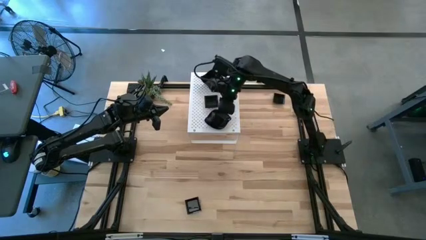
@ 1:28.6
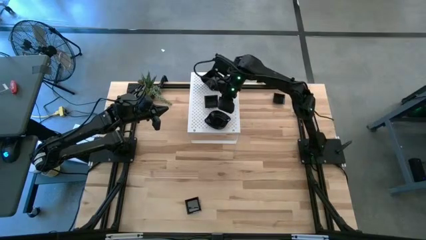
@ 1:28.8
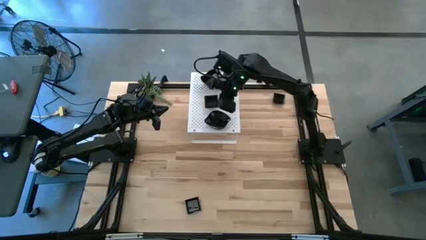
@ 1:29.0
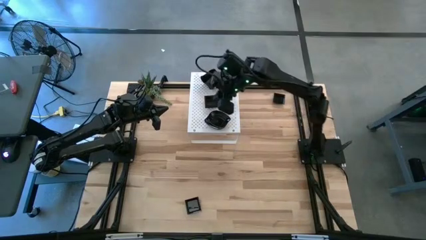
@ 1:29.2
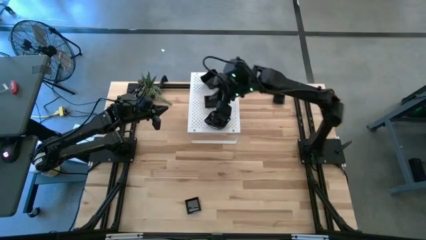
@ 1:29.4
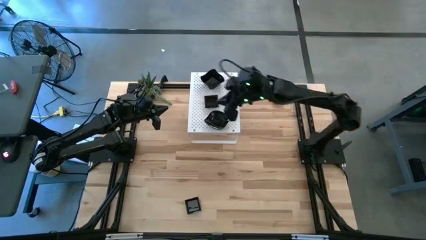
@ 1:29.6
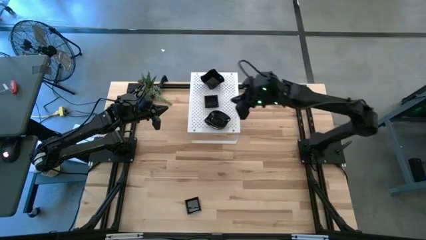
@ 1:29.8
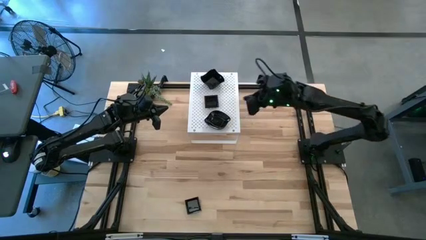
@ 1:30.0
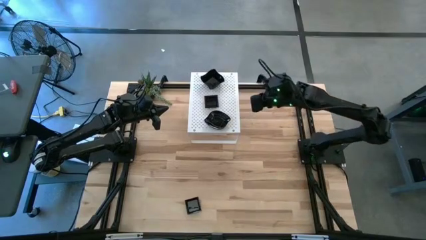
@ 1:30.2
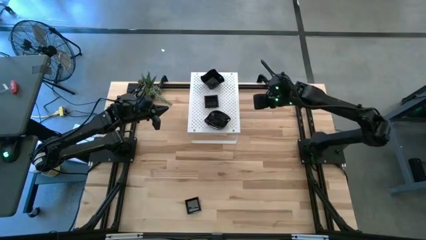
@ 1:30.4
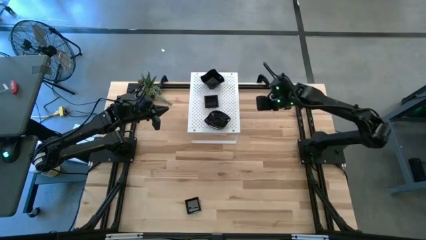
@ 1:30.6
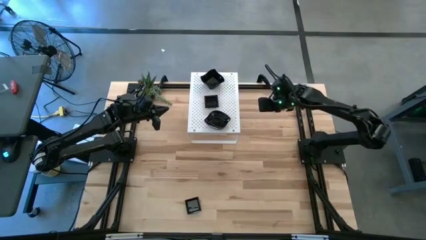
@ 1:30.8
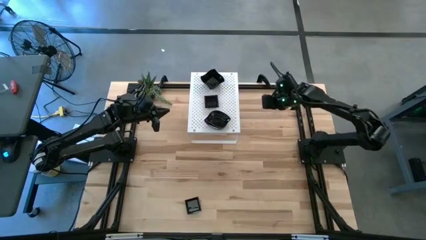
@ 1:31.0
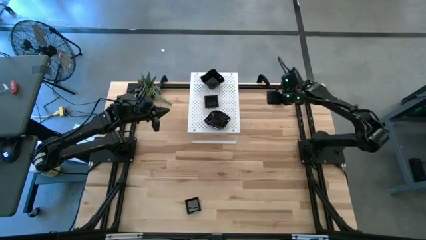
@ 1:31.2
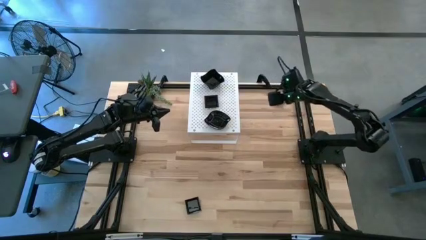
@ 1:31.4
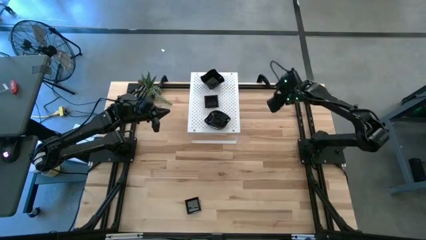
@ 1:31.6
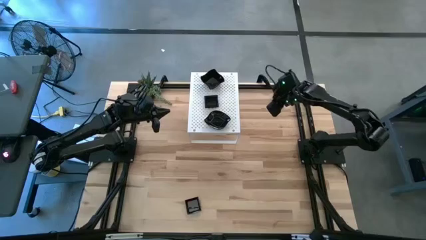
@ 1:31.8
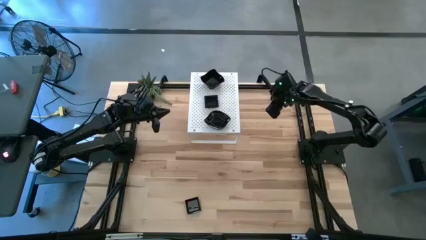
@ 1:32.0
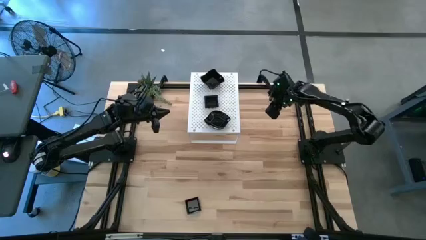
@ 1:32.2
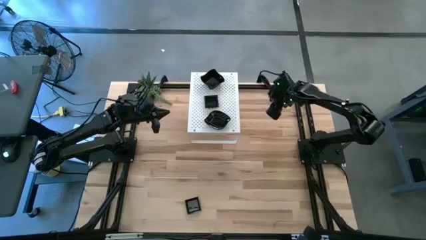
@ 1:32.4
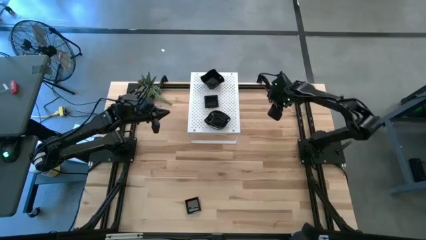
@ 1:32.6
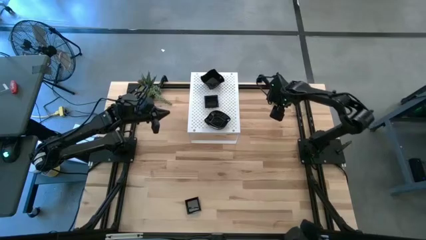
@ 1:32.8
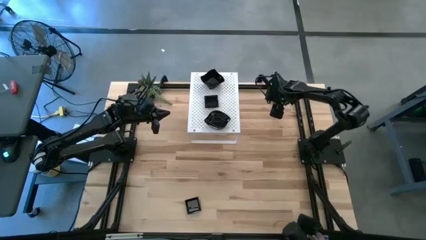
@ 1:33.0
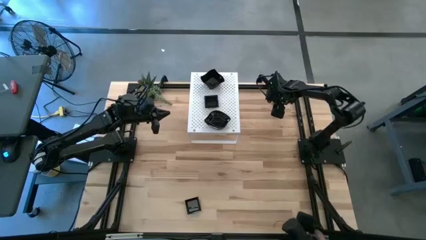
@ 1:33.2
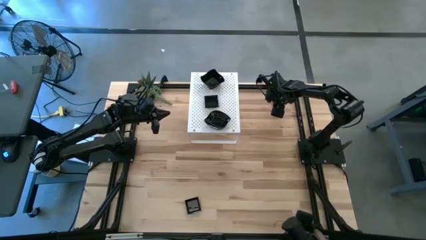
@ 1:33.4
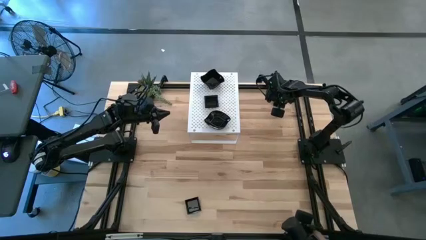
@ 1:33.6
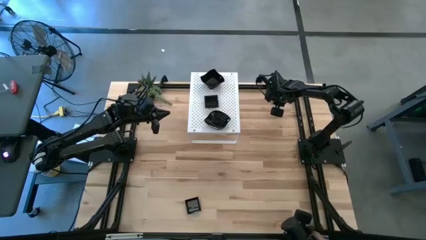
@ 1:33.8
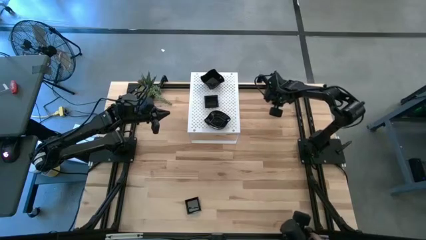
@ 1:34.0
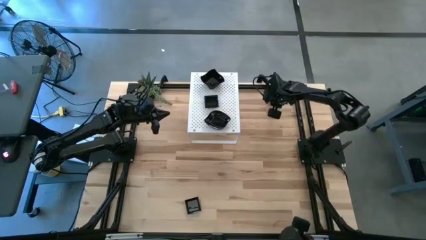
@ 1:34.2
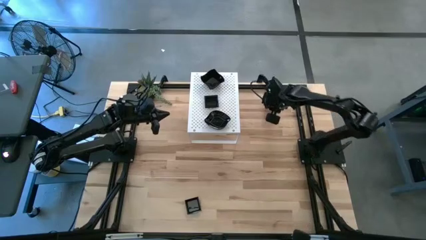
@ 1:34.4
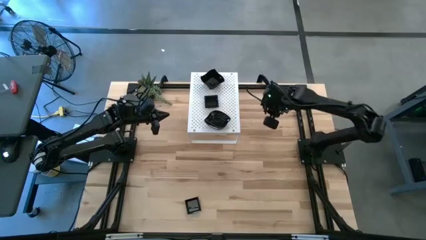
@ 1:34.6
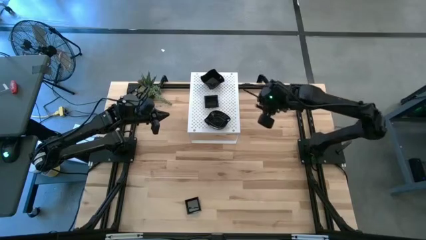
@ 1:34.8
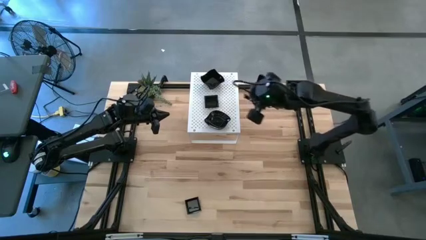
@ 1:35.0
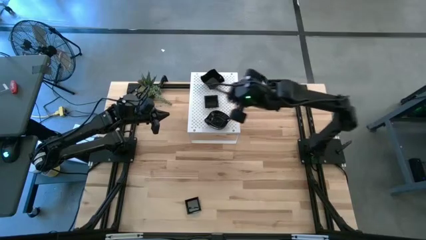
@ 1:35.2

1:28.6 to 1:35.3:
Task: Pick & Place Mini shaped plates
Stack the black square plate on top of the black square plate on the shelf

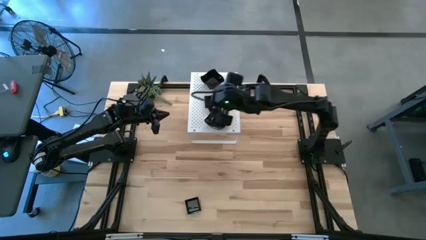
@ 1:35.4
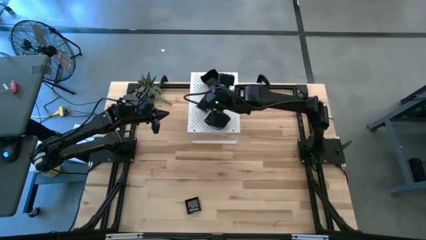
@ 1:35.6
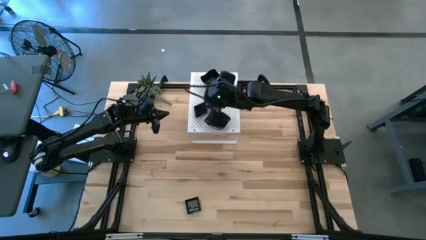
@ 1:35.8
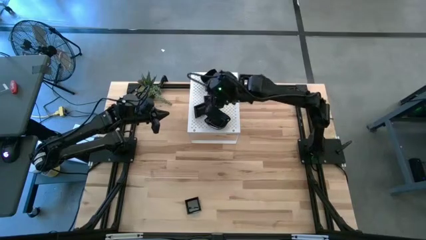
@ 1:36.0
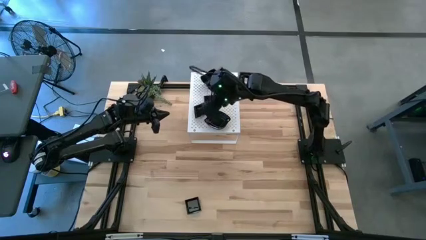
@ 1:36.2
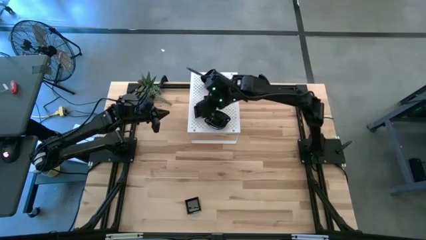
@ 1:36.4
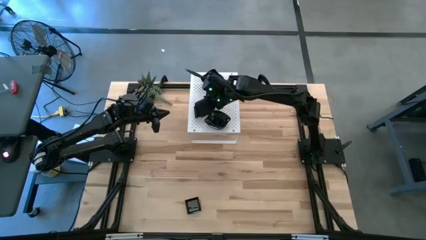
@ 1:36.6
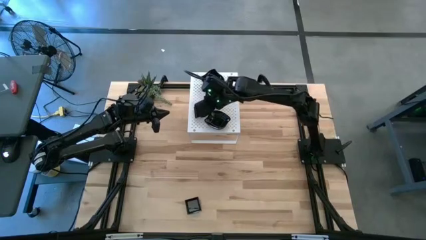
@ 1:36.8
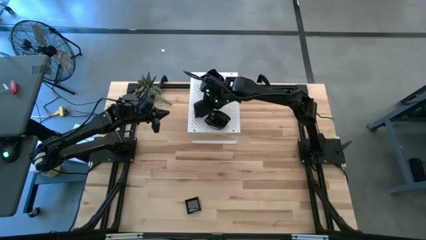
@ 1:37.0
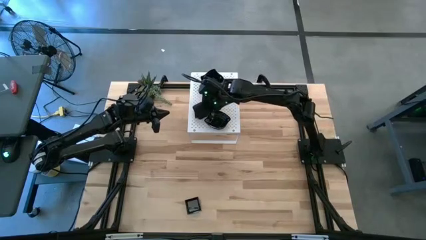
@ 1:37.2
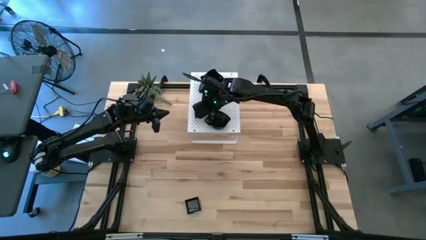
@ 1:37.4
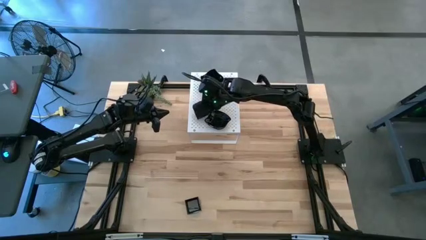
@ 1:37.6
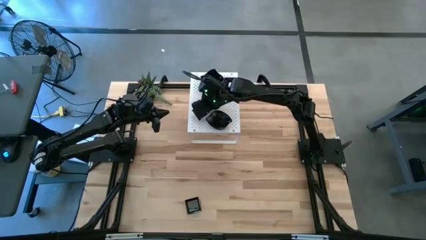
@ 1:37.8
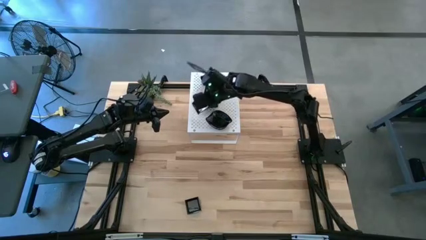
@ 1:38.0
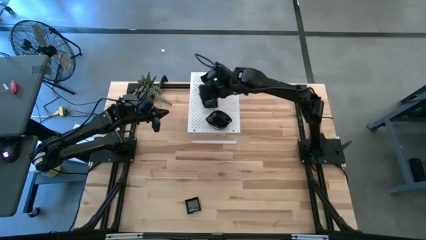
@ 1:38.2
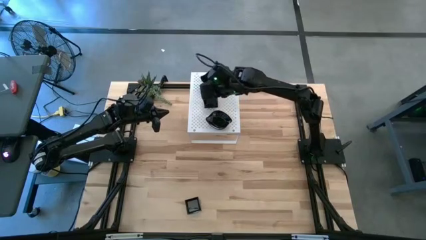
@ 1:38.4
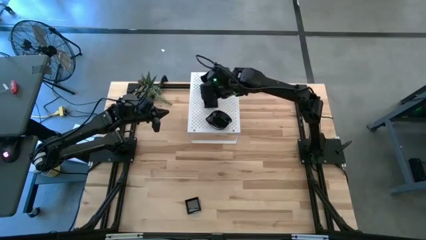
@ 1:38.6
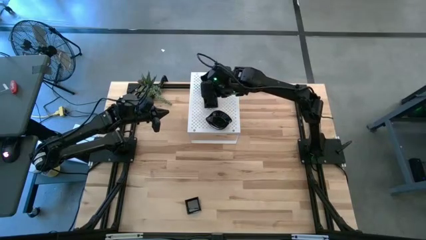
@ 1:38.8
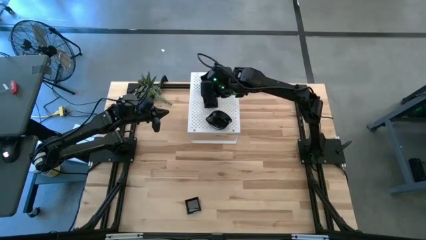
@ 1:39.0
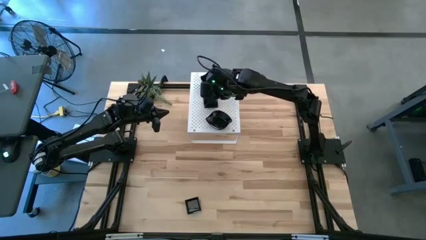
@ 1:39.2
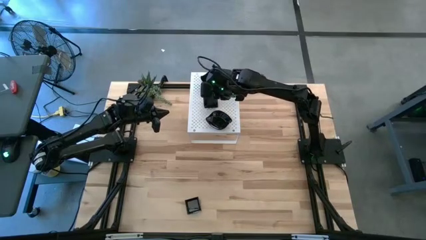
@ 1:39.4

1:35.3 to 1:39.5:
Stack the black square plate on top of the black square plate on the shelf

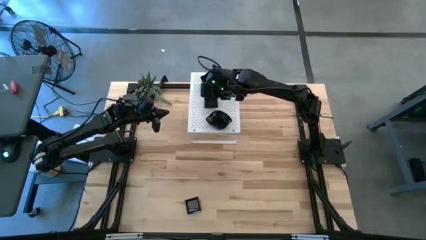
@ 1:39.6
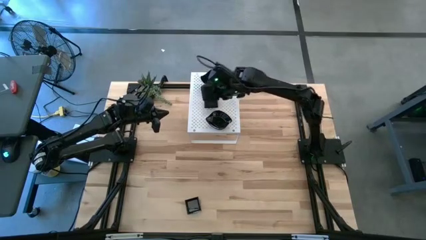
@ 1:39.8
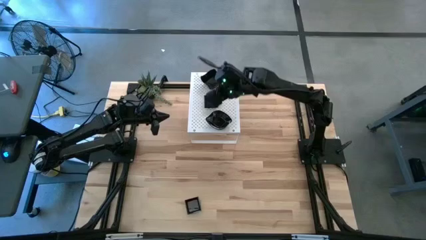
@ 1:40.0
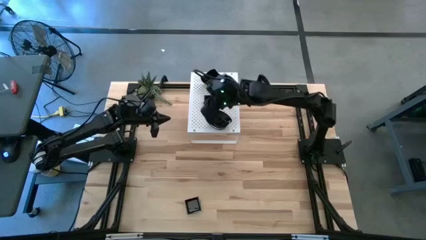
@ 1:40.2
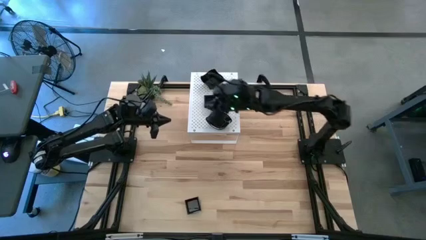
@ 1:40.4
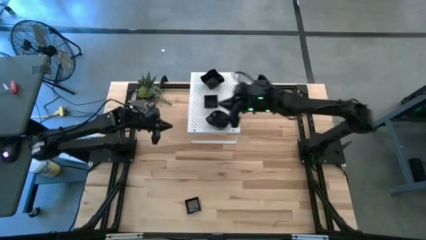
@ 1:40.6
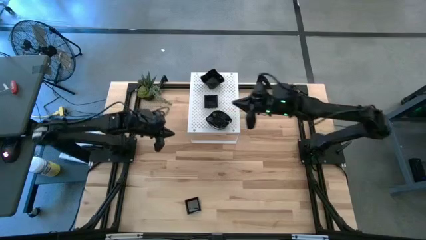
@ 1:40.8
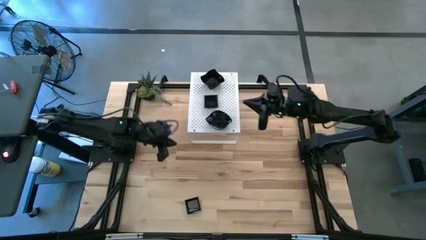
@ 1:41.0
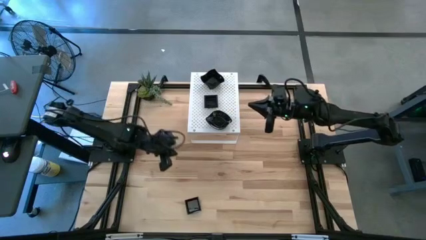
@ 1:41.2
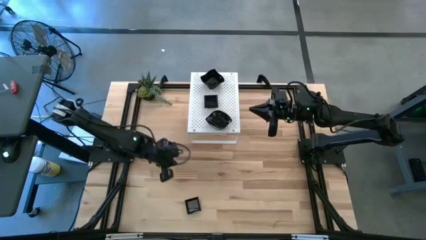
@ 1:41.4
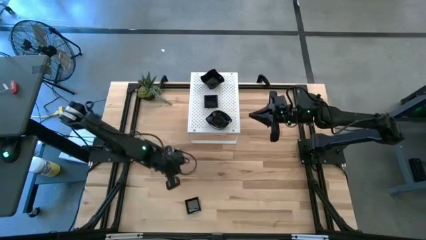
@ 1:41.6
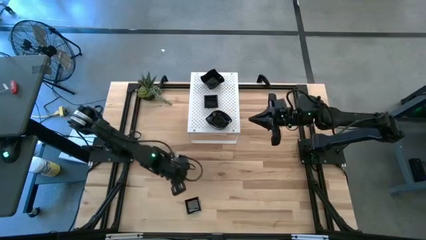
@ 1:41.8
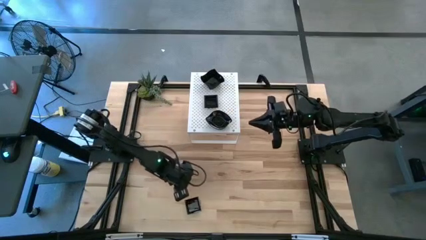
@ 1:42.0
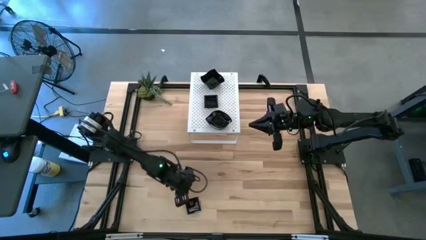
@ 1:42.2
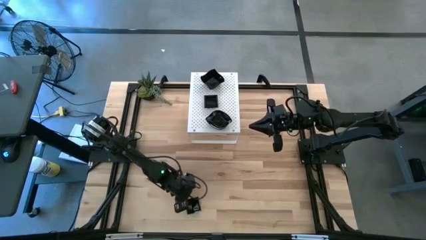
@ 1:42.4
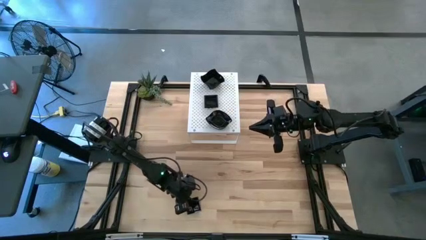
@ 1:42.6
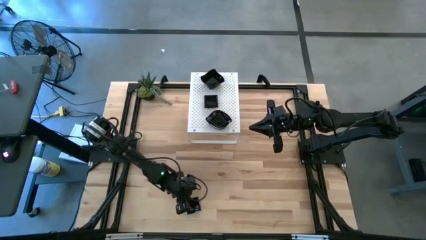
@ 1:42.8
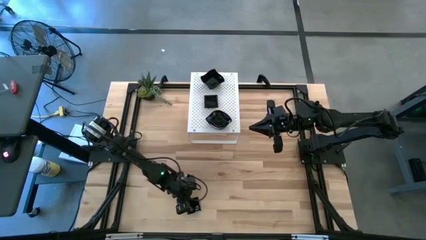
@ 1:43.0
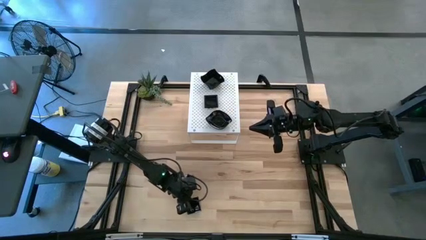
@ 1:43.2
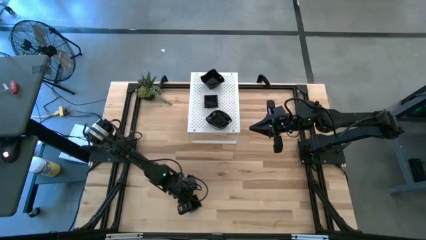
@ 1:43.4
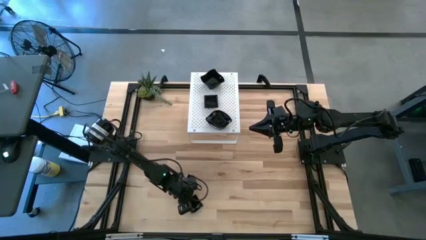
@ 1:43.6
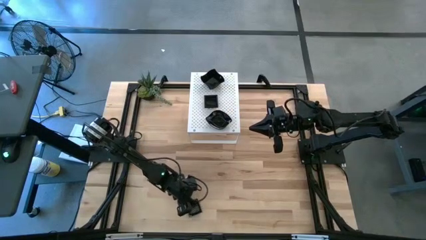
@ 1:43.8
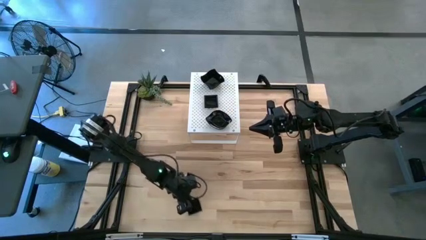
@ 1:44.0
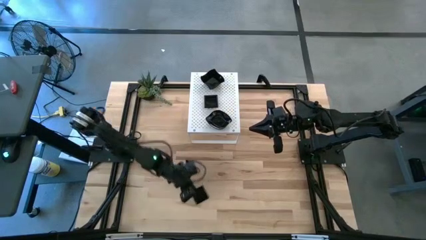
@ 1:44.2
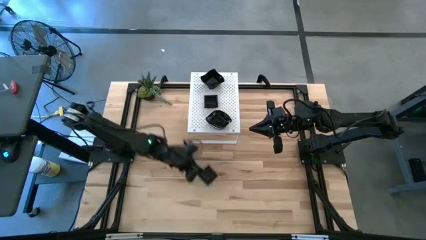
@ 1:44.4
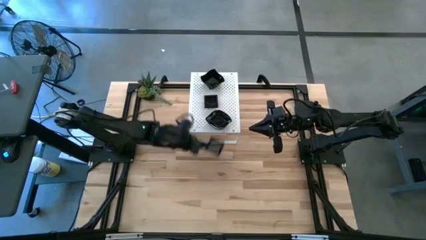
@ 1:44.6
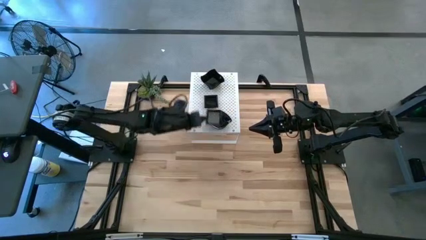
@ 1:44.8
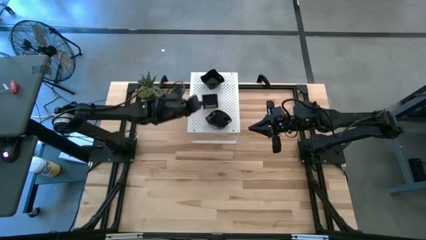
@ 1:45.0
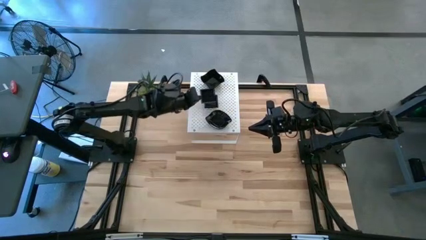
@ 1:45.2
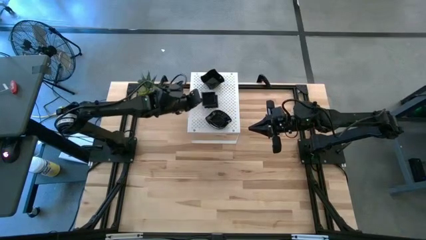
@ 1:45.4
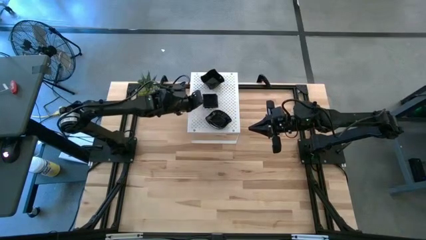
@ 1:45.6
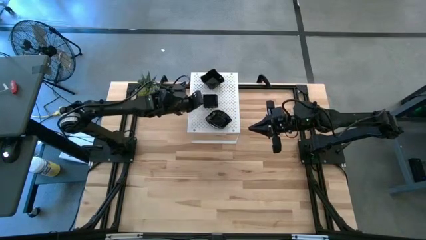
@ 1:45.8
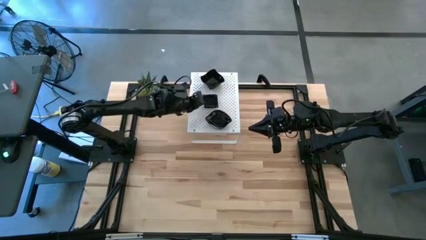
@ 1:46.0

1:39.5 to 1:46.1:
Stack the black square plate on top of the black square plate on the shelf
